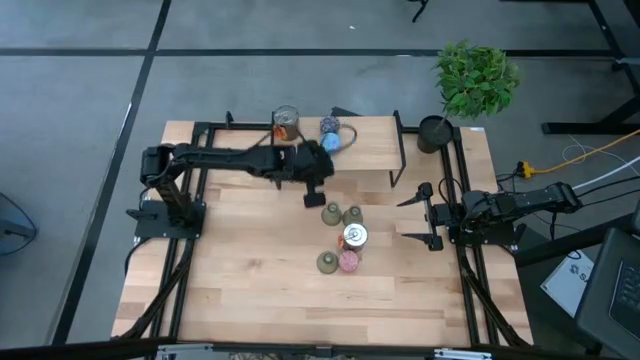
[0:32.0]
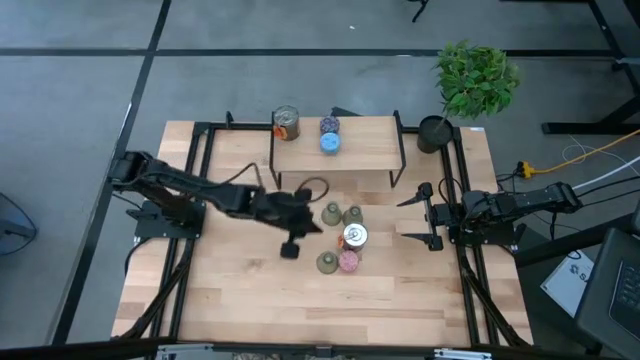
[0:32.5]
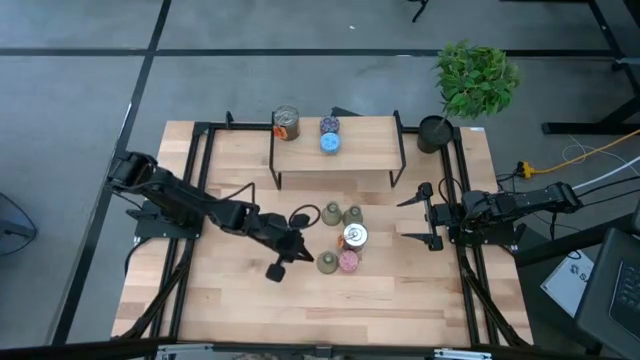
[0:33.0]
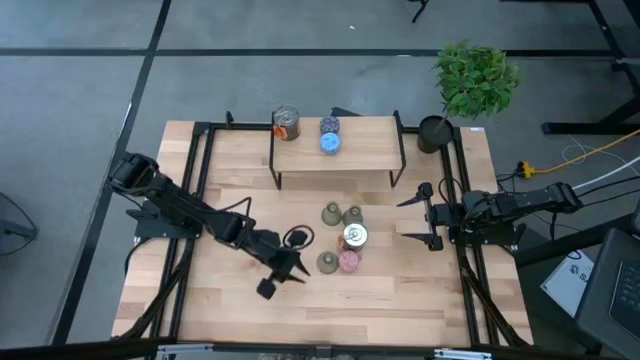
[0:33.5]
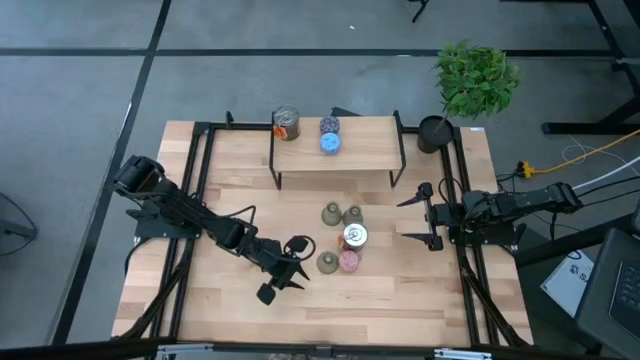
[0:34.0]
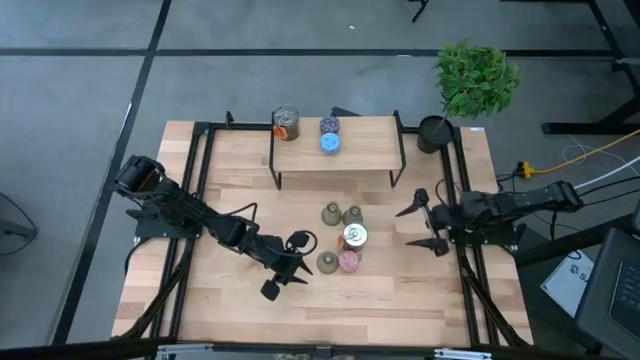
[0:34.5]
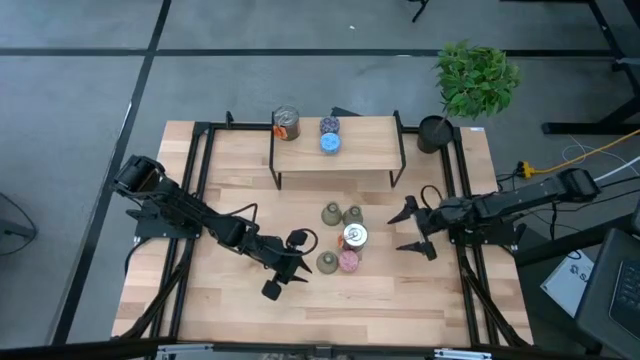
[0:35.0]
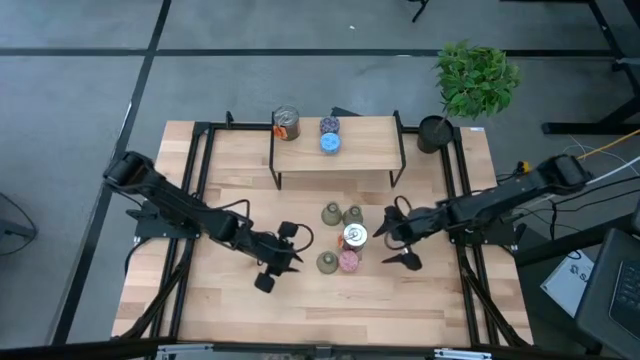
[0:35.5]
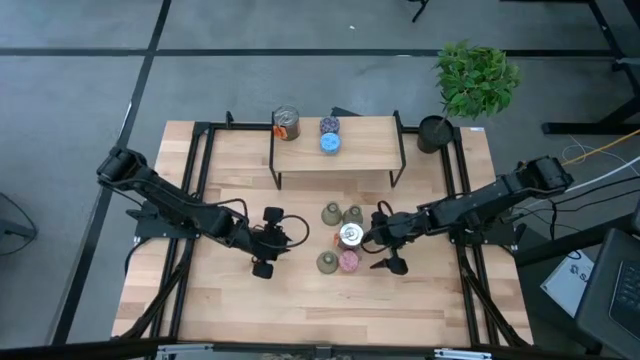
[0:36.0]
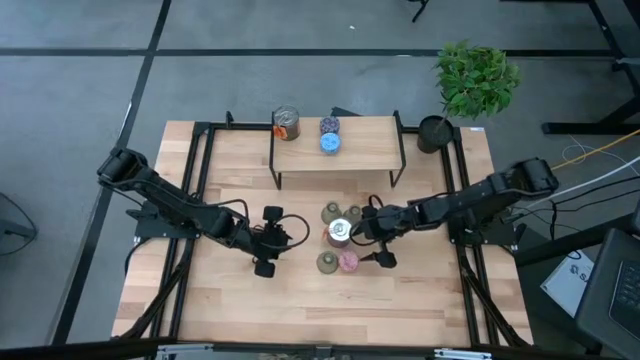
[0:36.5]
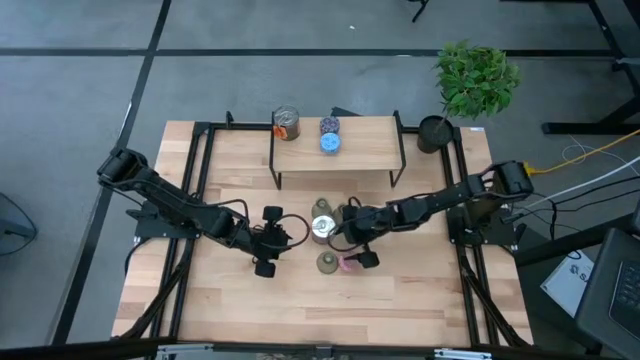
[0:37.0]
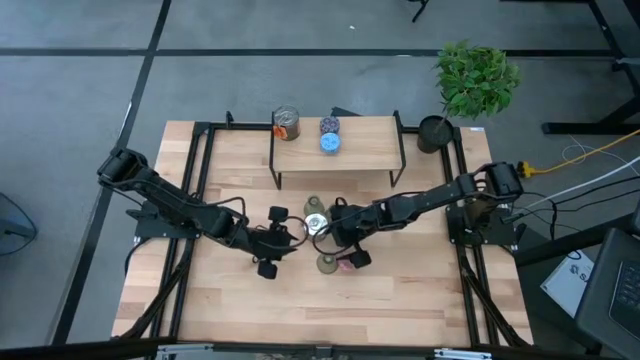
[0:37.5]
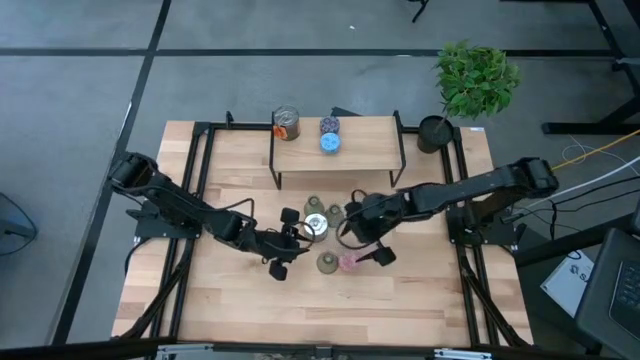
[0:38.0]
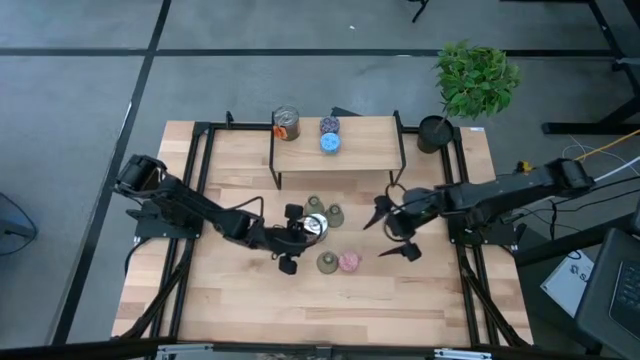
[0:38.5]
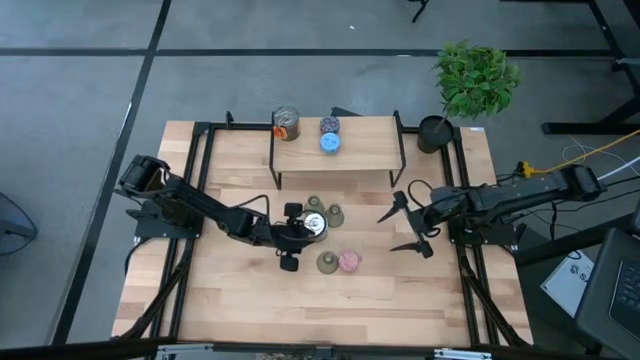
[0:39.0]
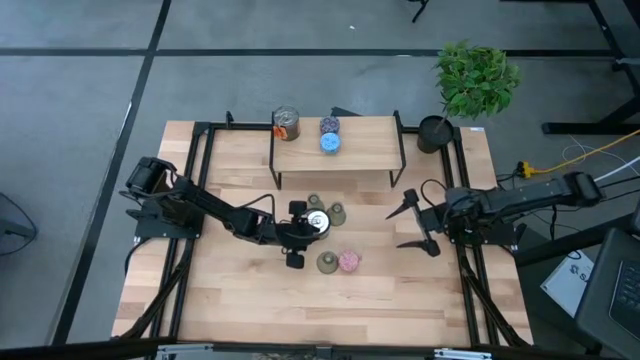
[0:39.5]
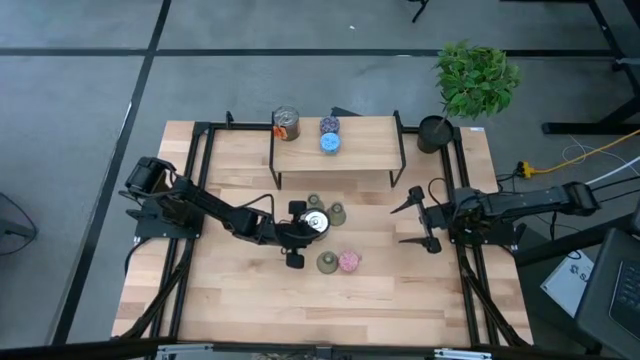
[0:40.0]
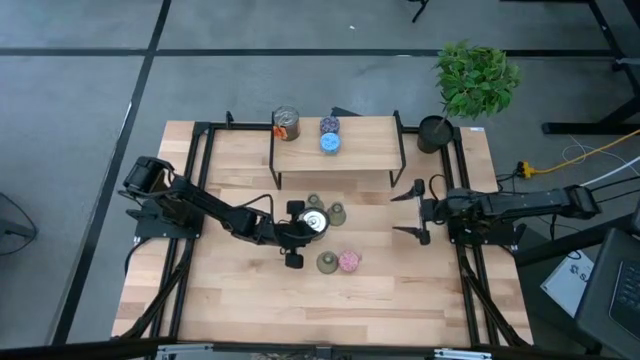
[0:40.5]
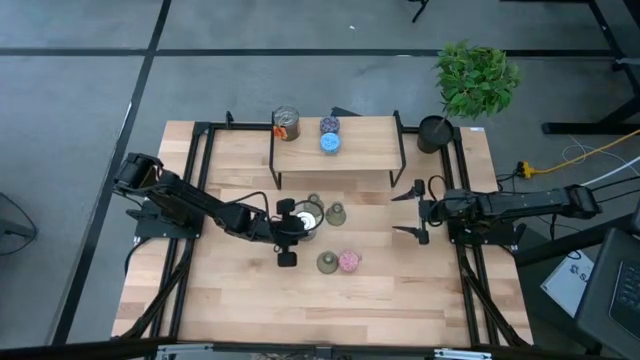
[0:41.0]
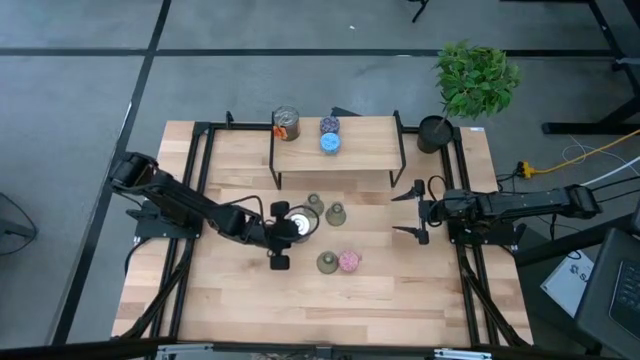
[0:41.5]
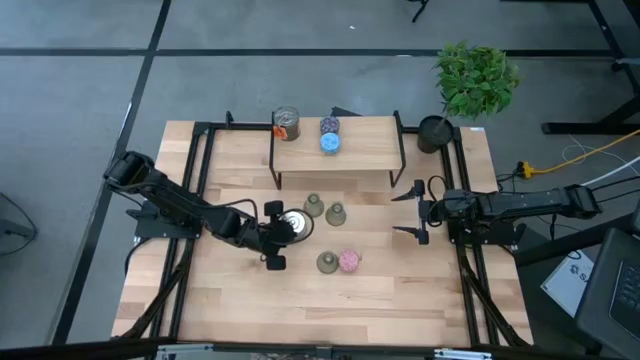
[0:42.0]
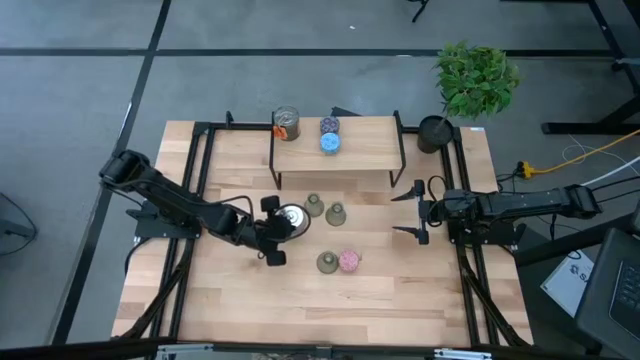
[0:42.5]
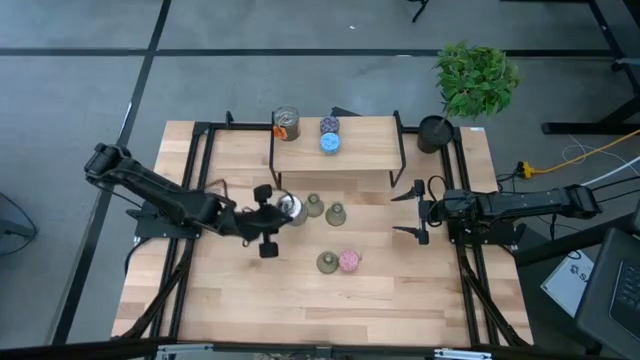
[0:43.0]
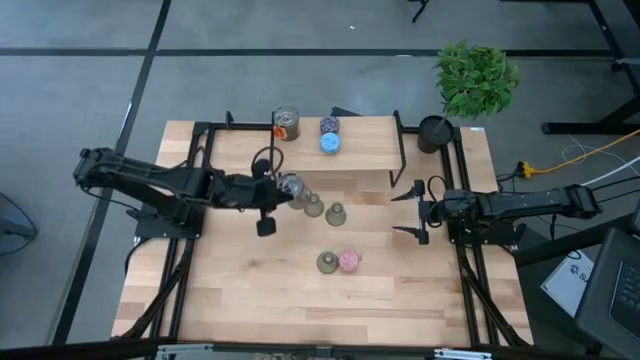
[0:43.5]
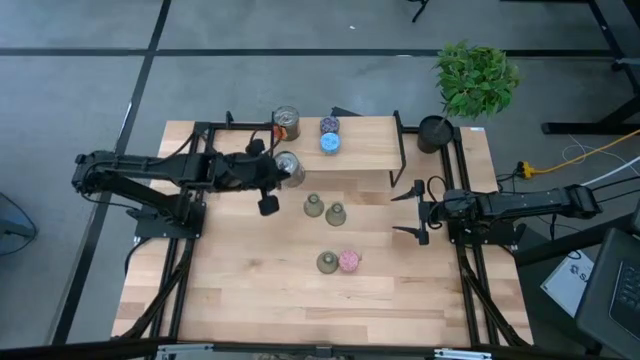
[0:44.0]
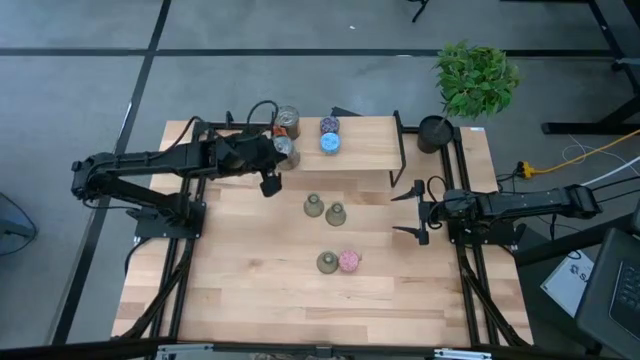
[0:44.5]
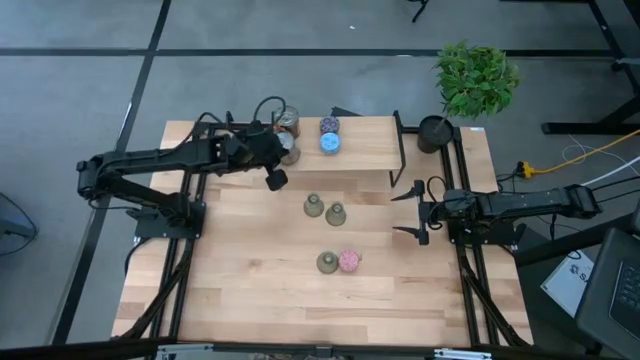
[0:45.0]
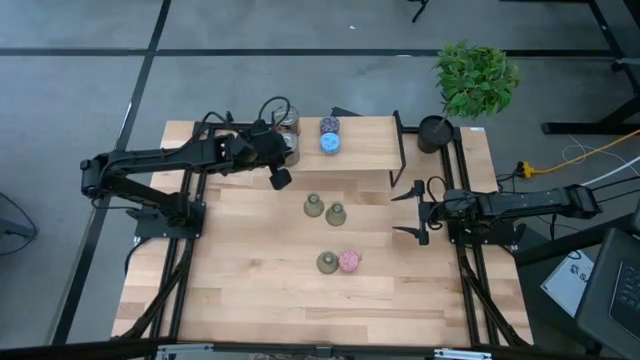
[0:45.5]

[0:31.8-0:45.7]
Task: Pick & Place candle stick holders
Put the brown scented candle on the shelf aligned with the other scented candle

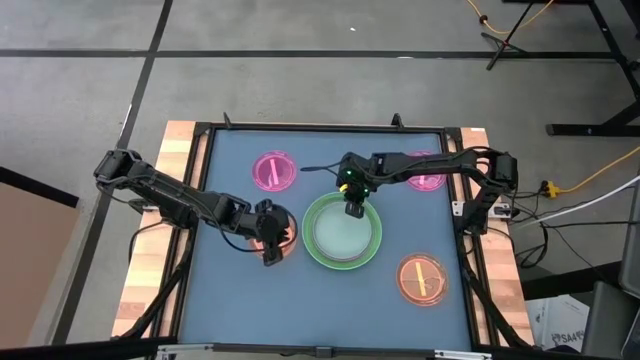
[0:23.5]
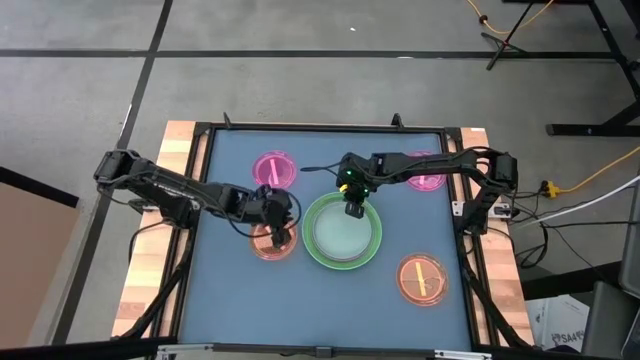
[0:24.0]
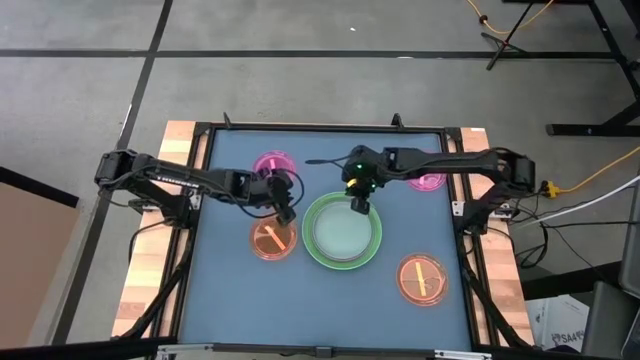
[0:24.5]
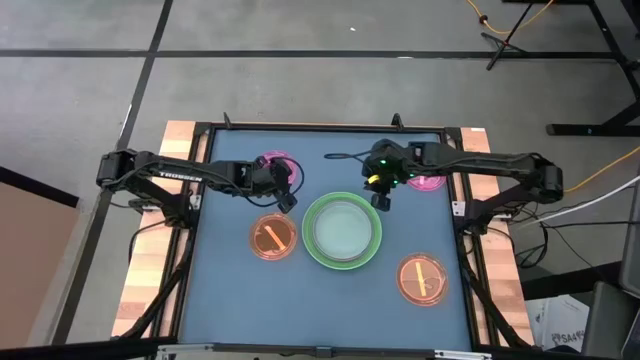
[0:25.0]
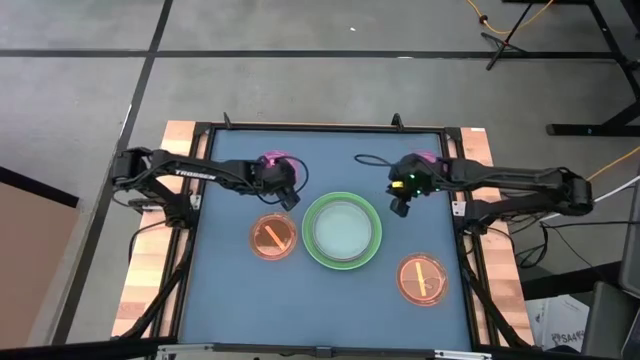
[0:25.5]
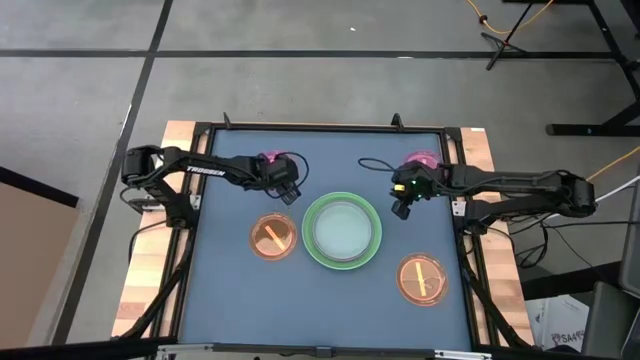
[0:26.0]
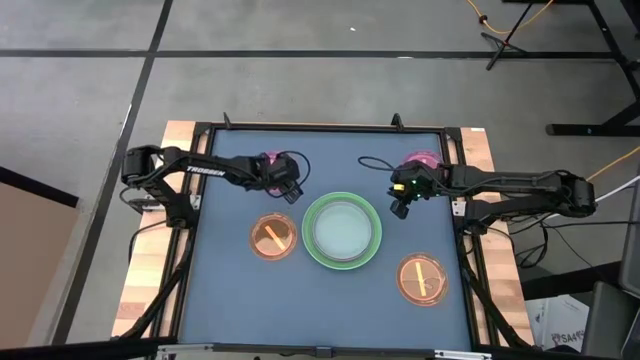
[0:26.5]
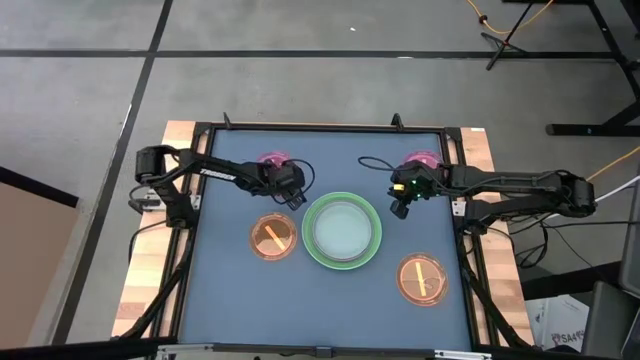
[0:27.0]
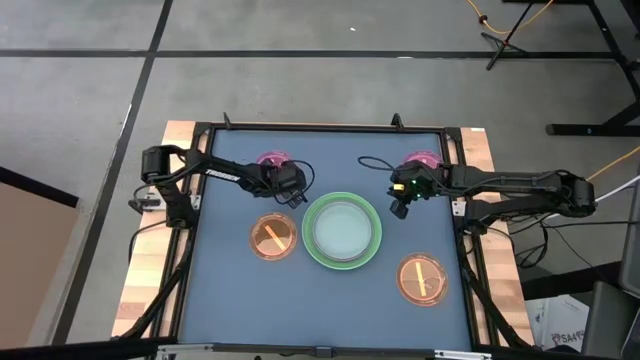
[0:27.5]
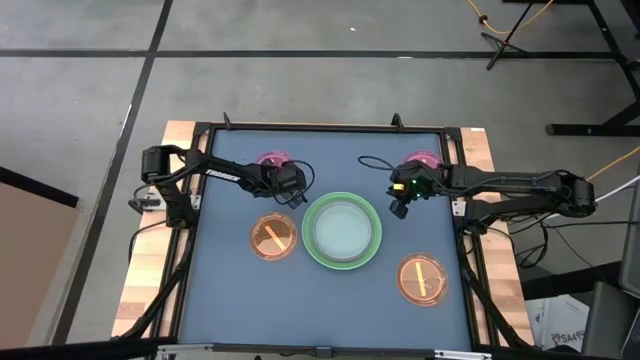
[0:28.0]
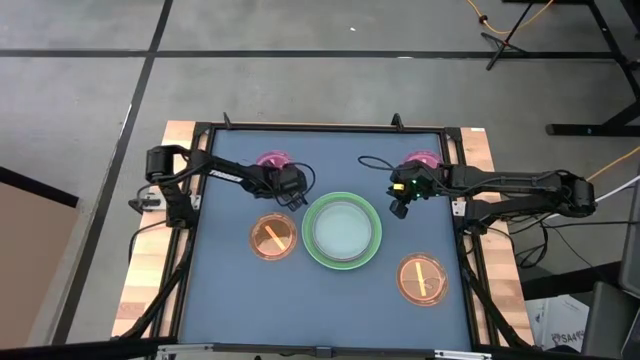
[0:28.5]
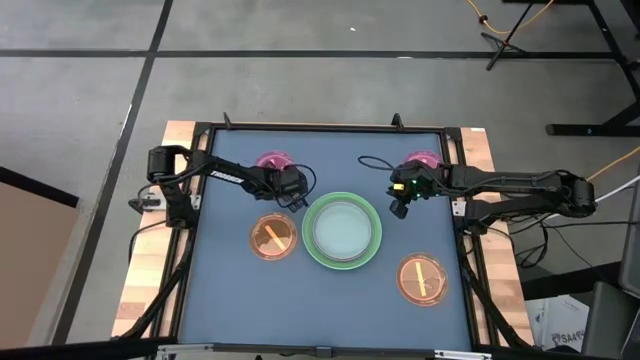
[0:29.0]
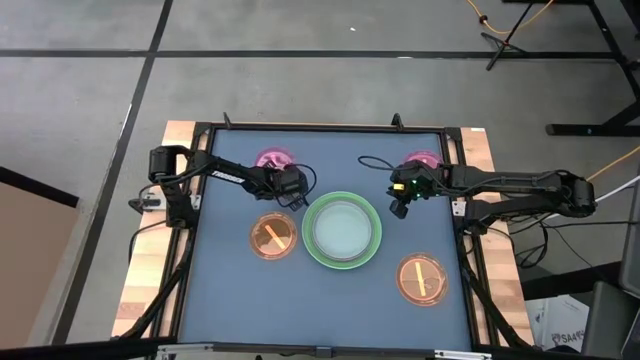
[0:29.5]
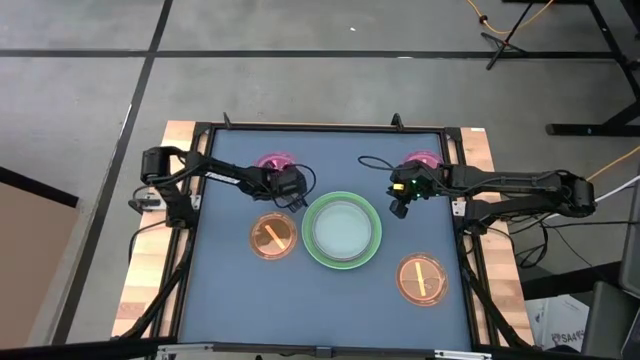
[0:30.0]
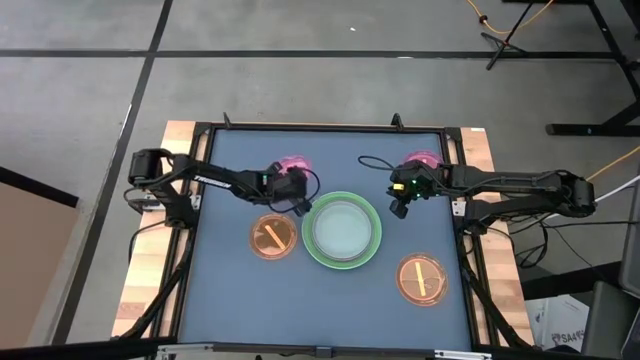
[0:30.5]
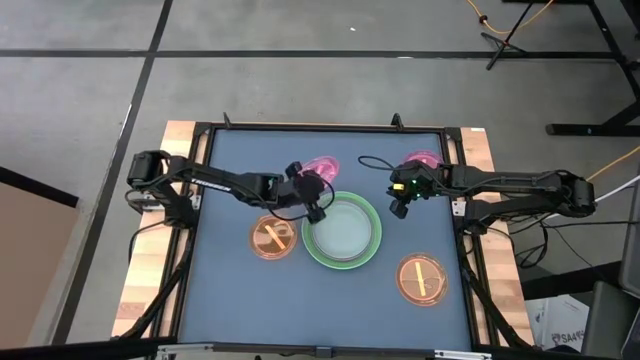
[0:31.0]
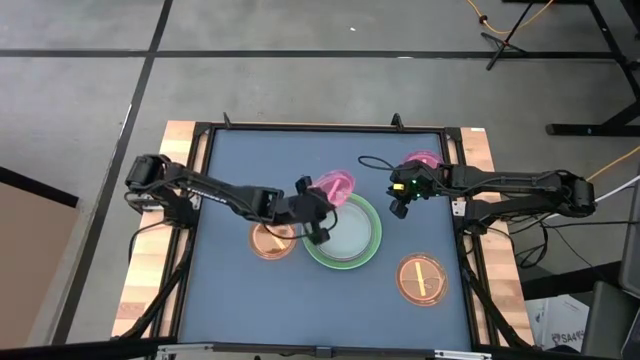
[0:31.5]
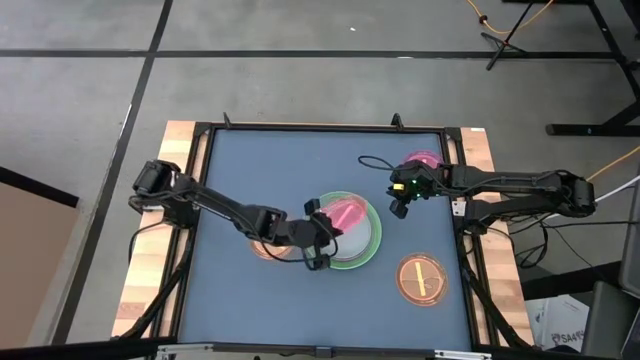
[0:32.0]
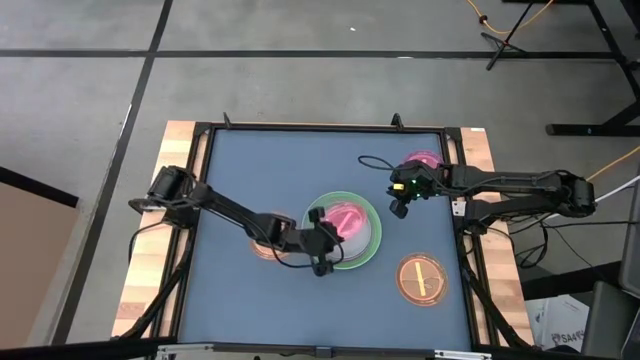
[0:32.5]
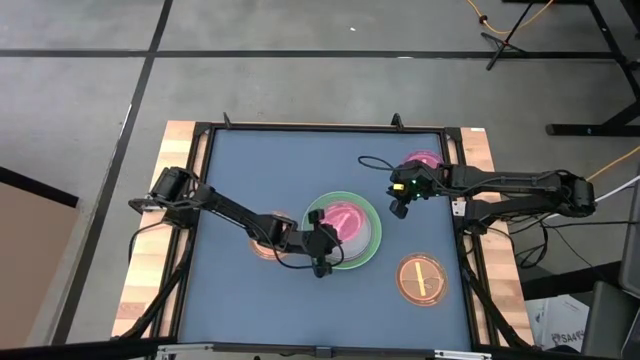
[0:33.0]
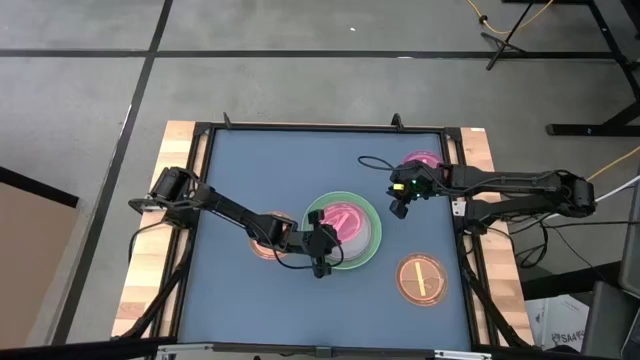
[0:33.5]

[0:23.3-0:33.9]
Task: Stack plastic plates
Stack the left light pink plate on top of the gray plate
